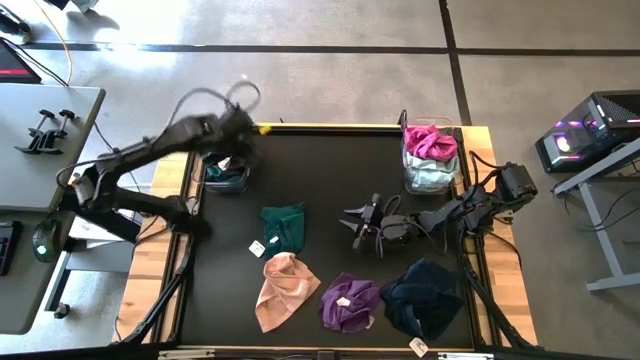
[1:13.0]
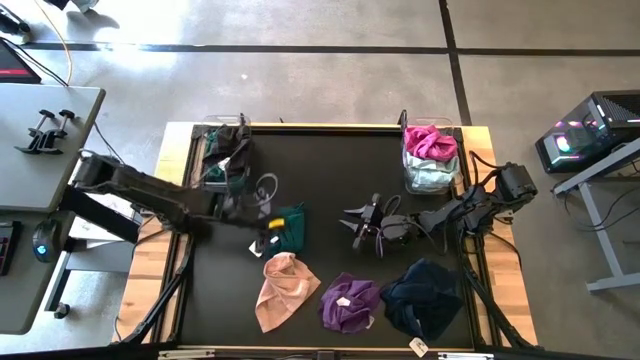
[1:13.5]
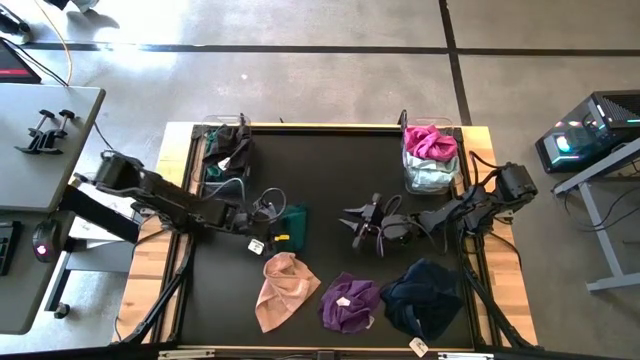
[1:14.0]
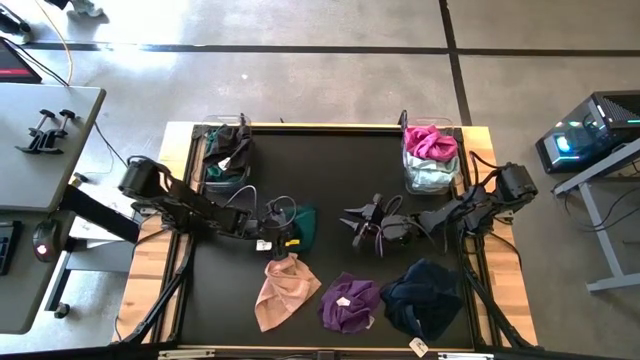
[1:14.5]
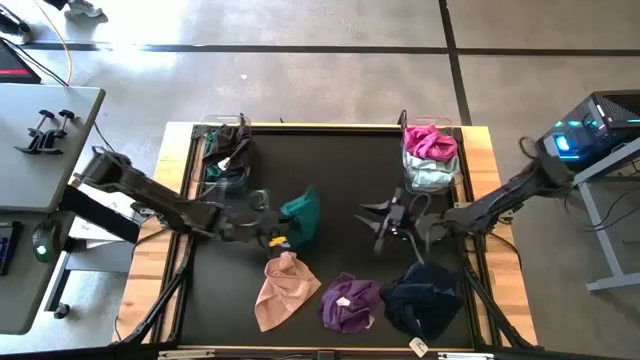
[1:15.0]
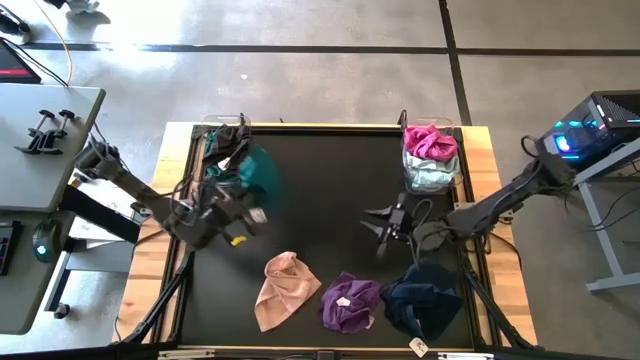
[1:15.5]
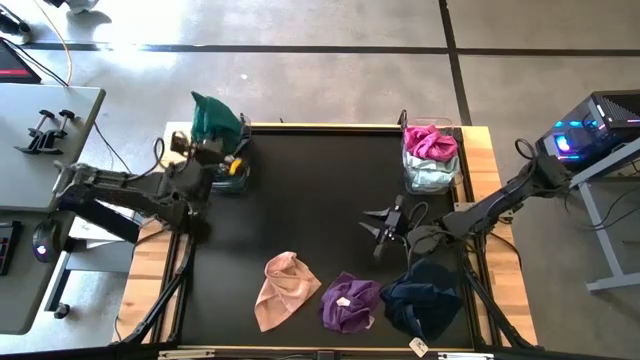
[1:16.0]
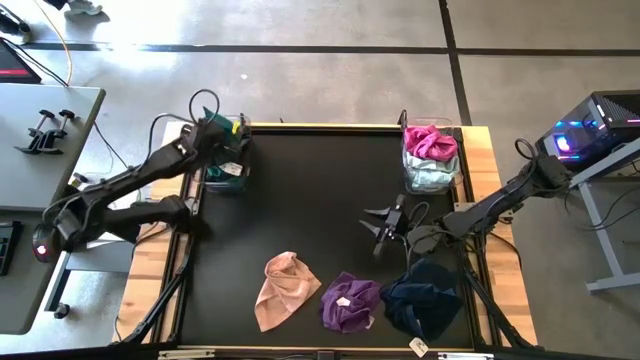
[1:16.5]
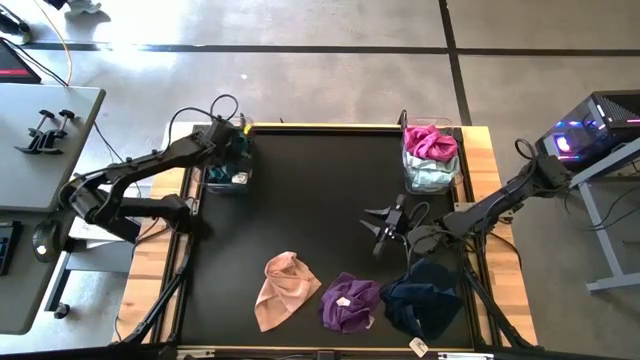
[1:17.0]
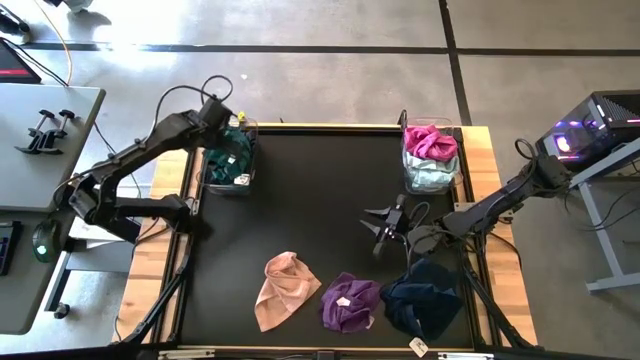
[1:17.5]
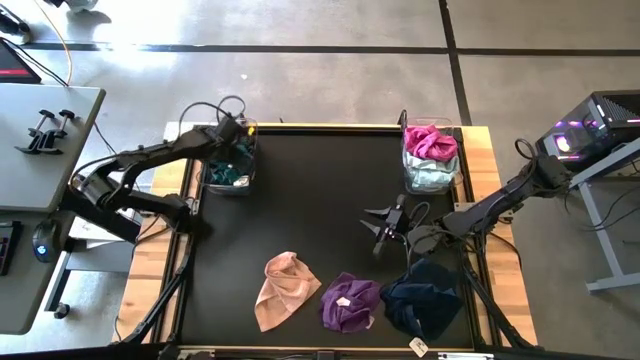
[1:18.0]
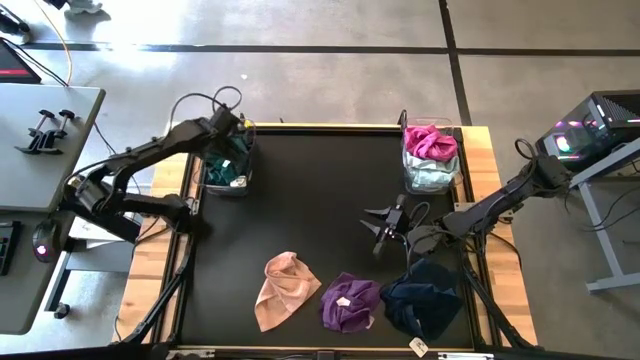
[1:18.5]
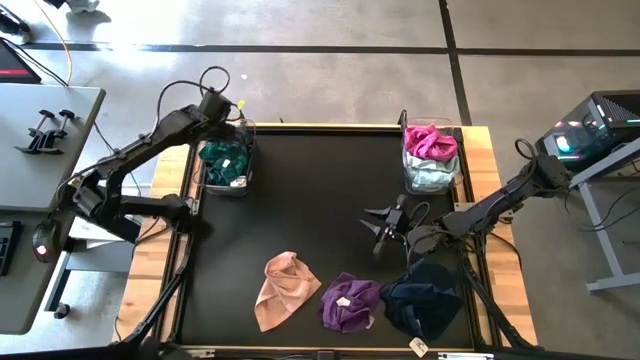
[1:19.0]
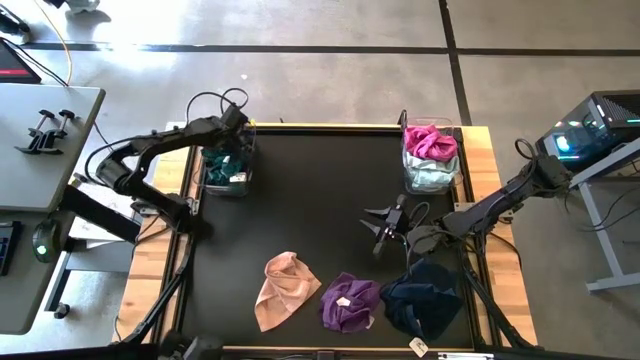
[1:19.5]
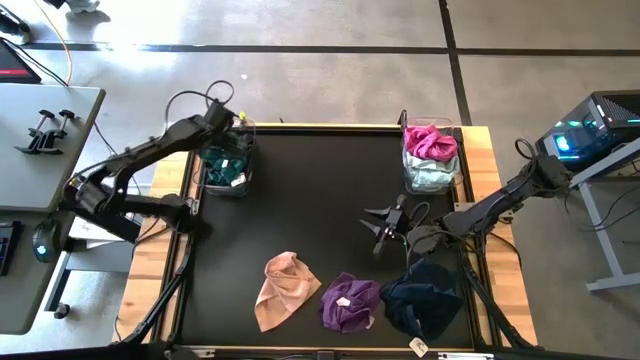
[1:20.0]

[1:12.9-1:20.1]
Task: Sort towels by color in basket
Put the green microfiber cloth into the left transparent bin

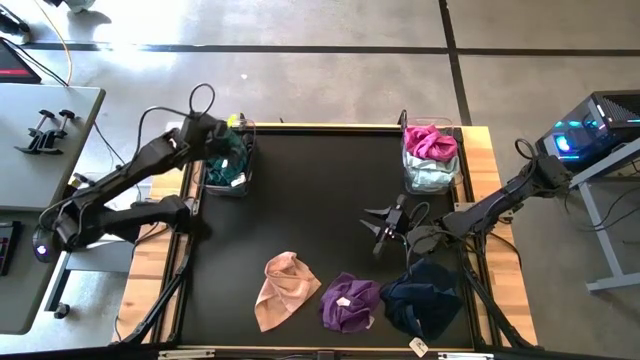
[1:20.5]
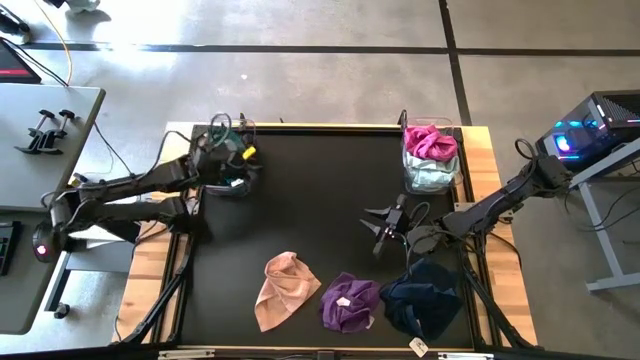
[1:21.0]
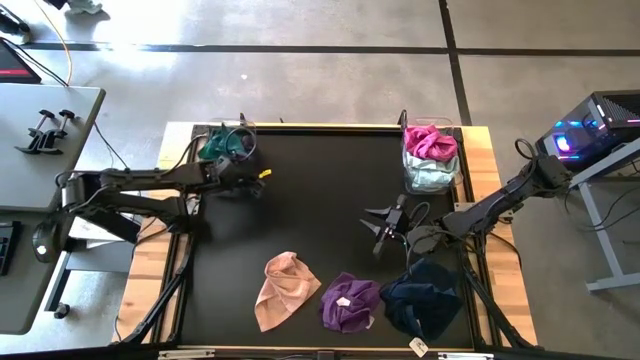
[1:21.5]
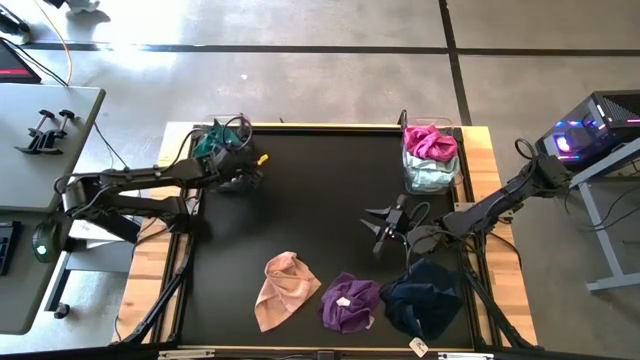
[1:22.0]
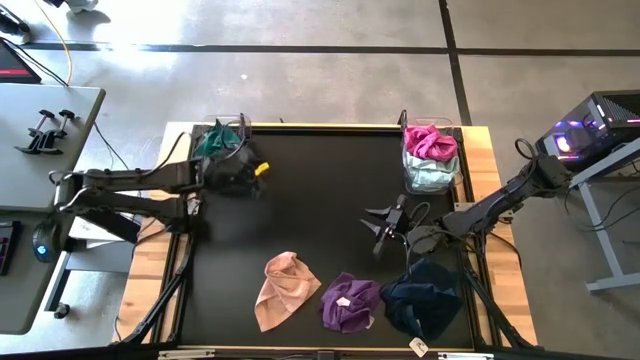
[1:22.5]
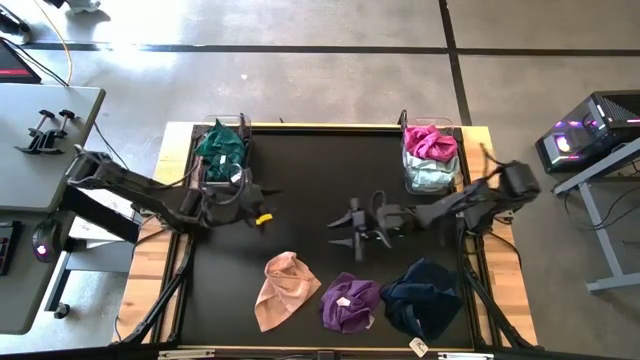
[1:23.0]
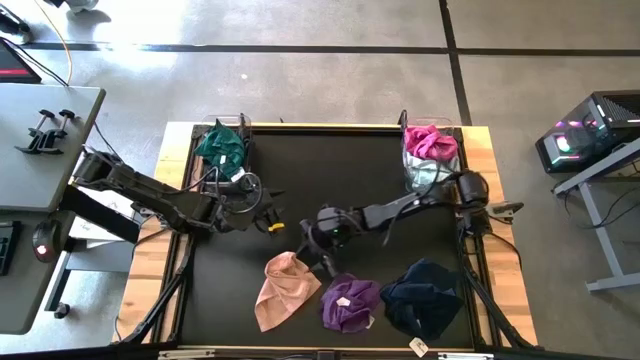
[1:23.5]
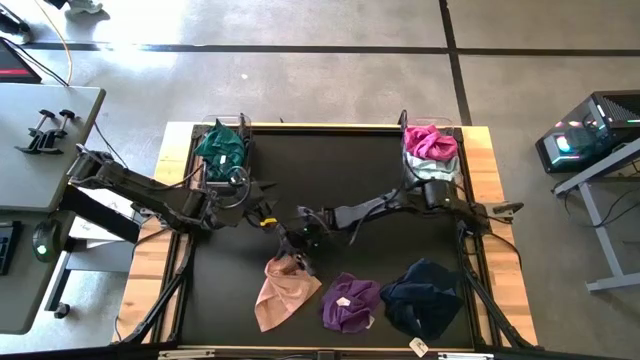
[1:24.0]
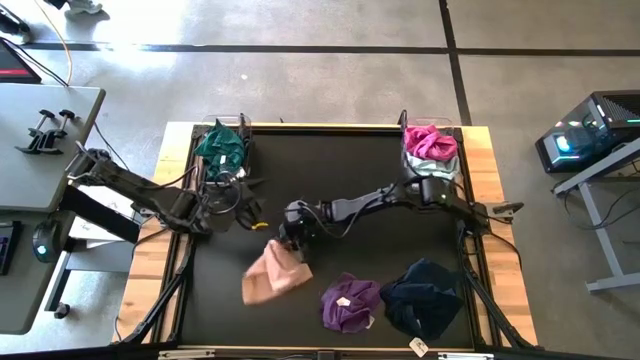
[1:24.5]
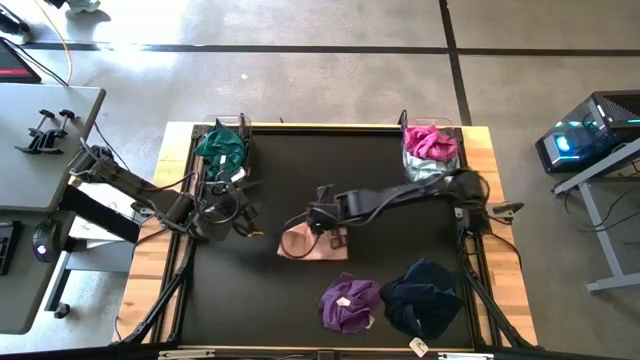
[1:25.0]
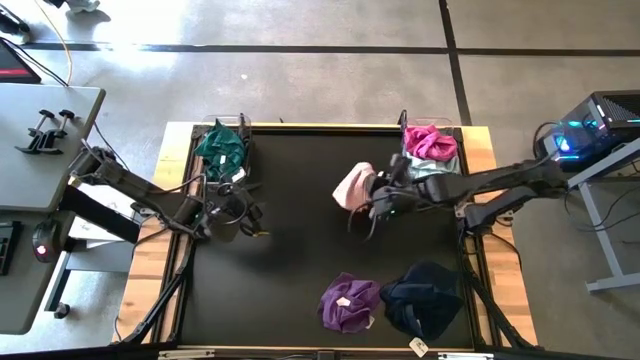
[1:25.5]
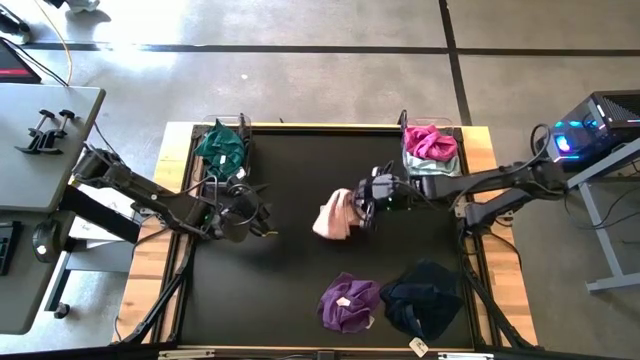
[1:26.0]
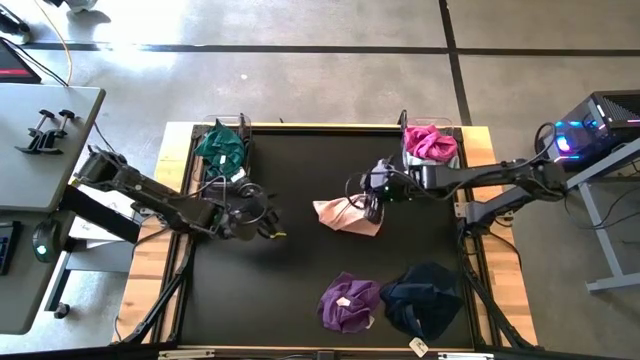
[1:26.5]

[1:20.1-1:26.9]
Put the orange microfiber cloth into the right transparent bin

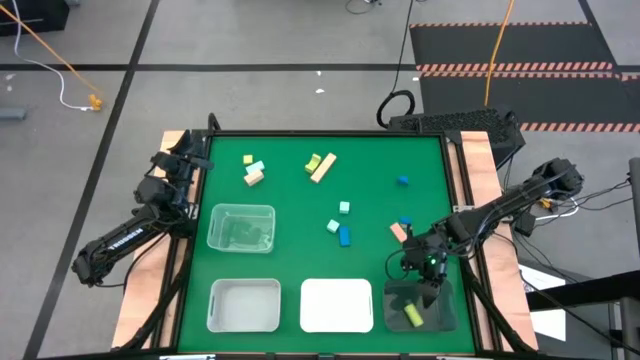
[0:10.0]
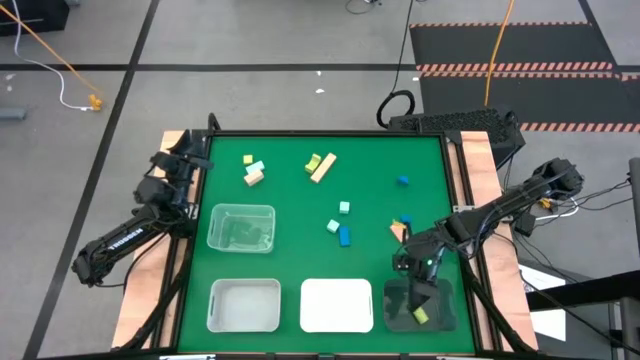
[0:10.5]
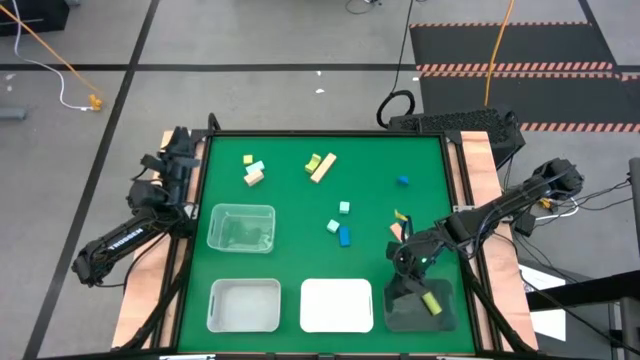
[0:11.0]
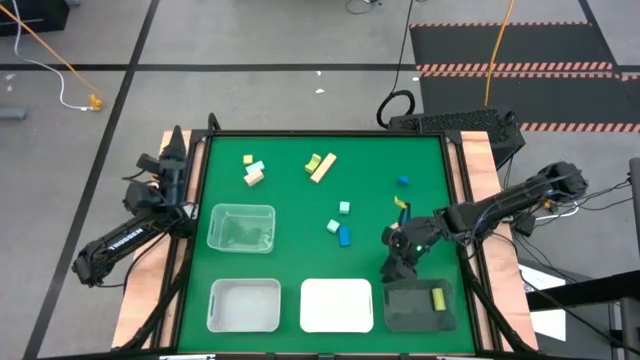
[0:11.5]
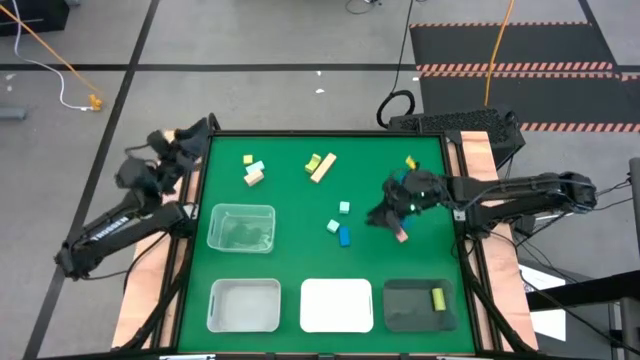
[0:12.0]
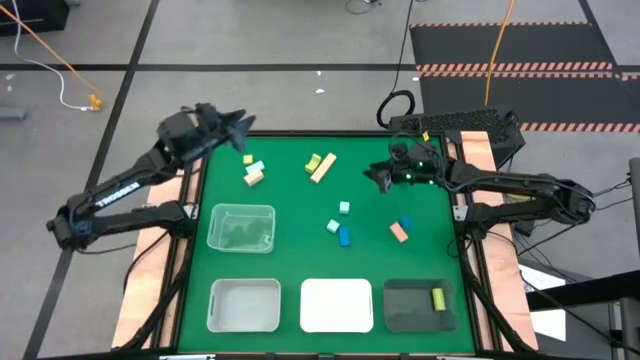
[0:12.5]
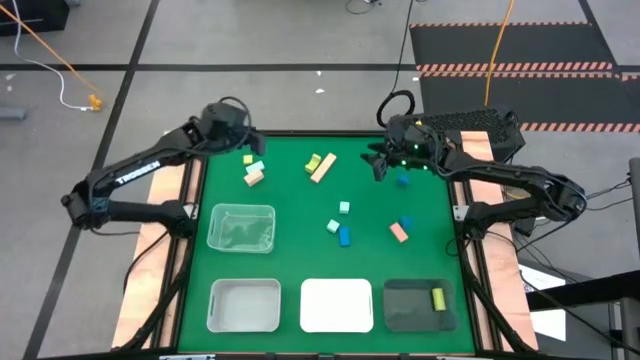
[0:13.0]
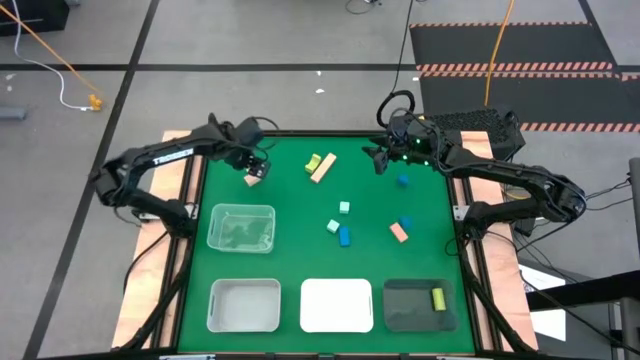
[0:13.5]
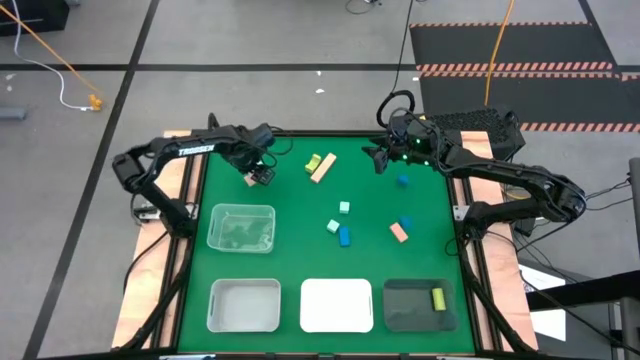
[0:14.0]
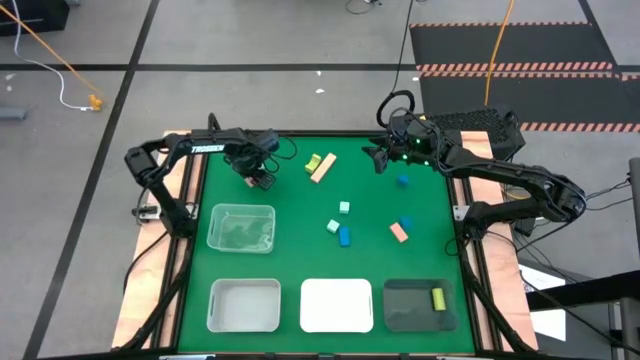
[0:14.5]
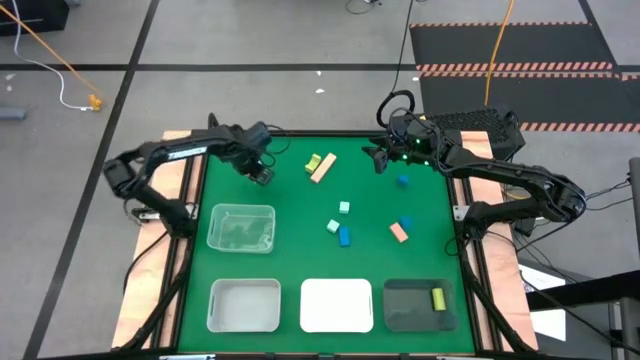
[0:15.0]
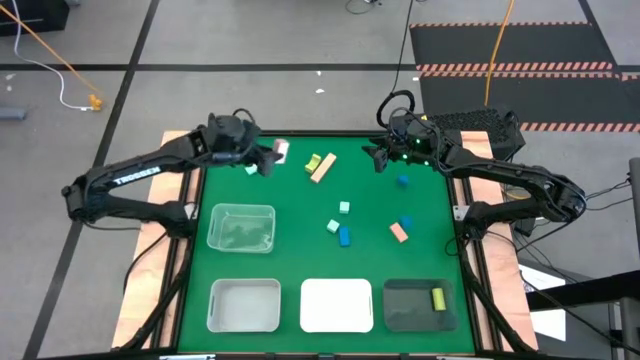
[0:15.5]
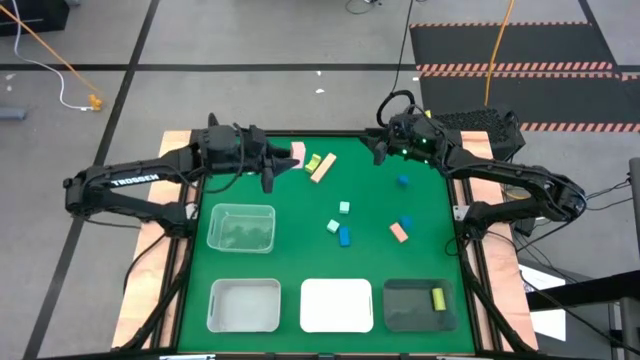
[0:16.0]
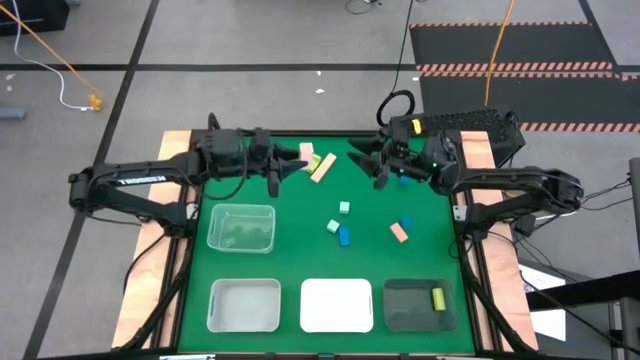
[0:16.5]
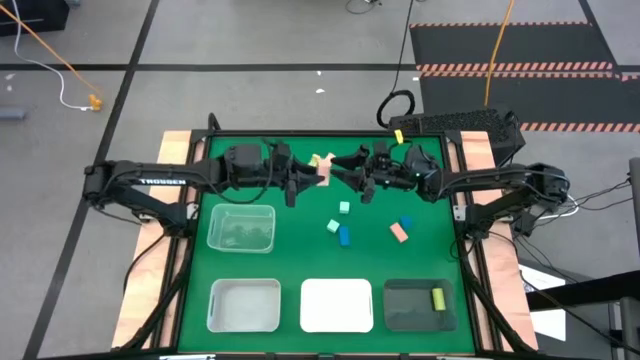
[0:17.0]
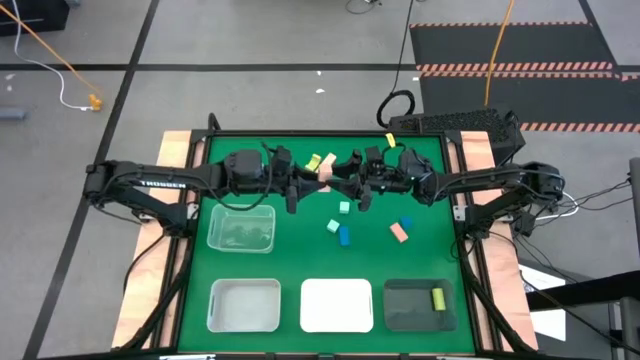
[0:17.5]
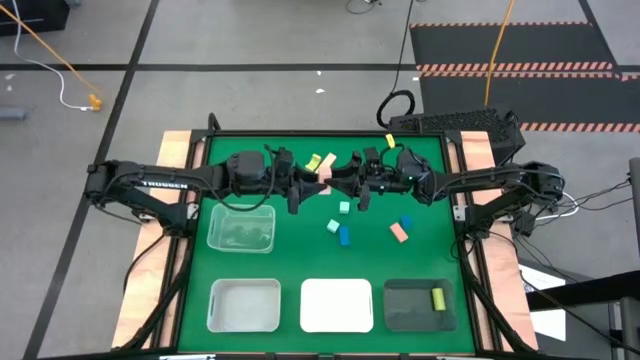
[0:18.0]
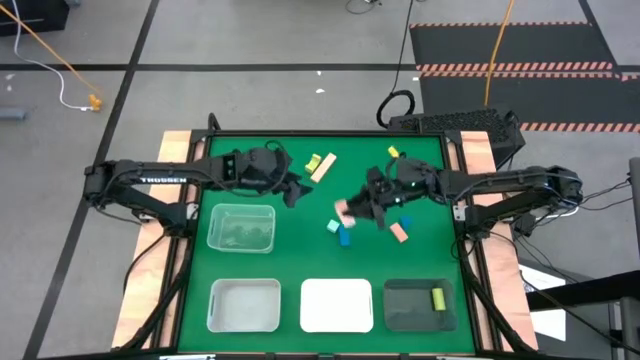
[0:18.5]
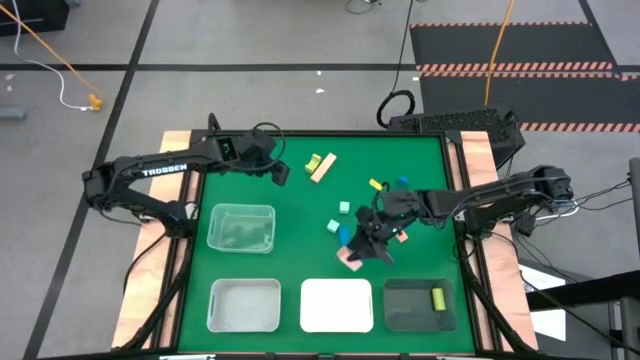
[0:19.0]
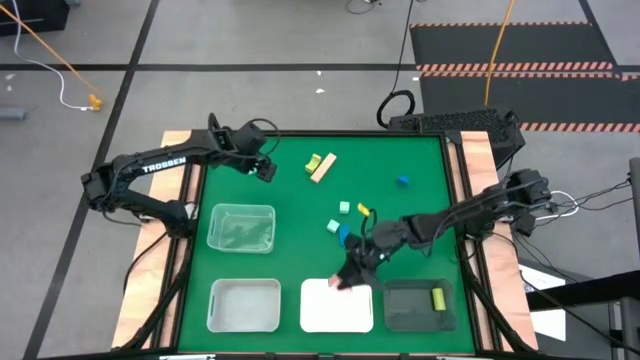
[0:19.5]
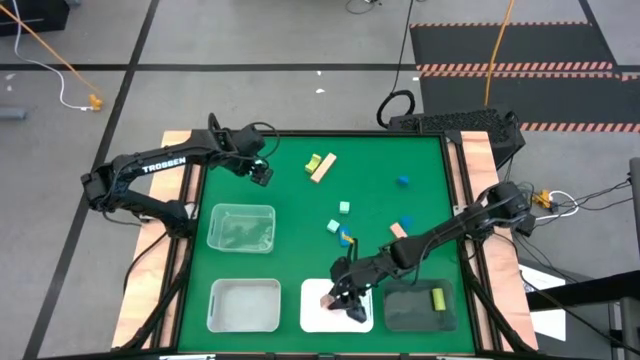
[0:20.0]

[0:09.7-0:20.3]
Task: Sort & place blocks by color
Put the top left pink block into the white bin
